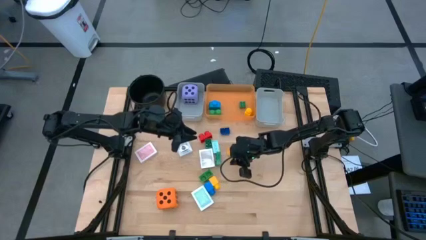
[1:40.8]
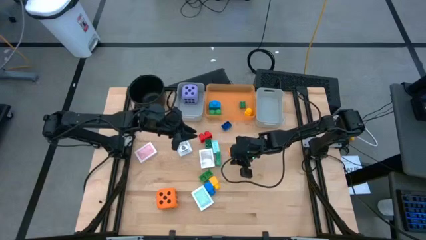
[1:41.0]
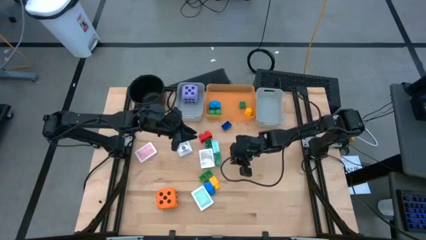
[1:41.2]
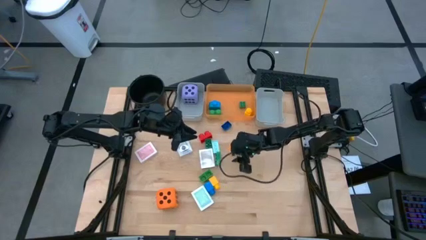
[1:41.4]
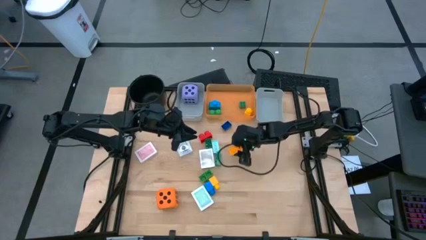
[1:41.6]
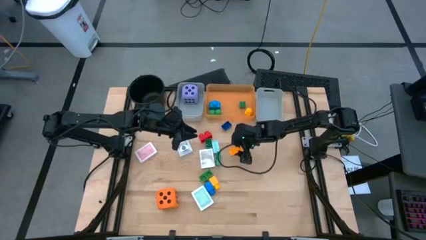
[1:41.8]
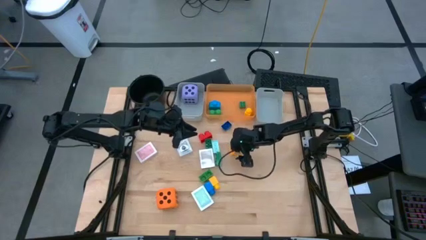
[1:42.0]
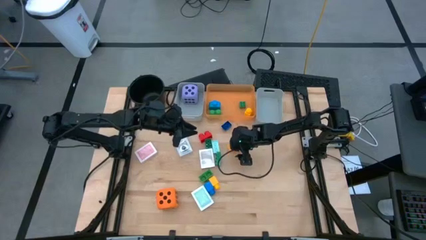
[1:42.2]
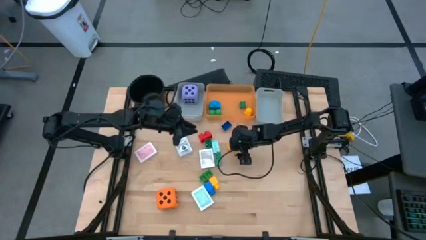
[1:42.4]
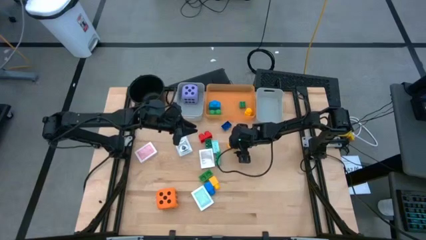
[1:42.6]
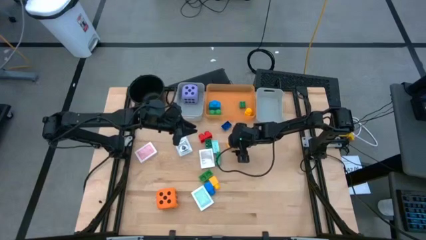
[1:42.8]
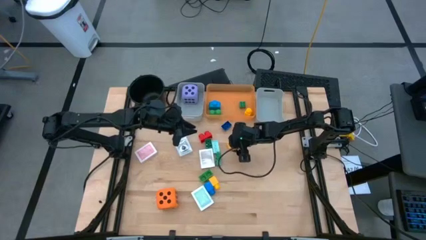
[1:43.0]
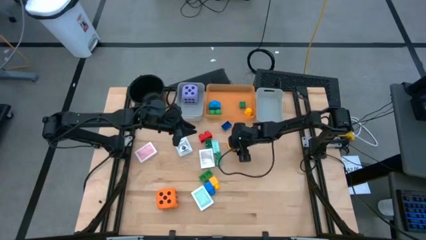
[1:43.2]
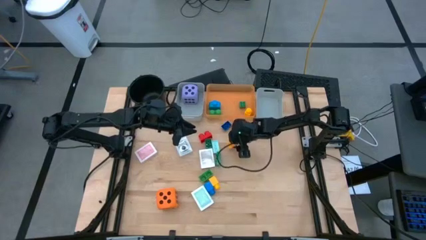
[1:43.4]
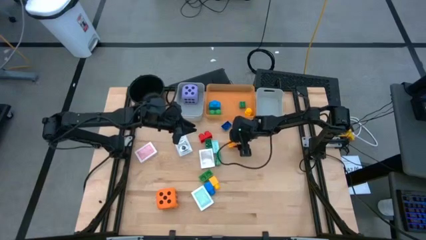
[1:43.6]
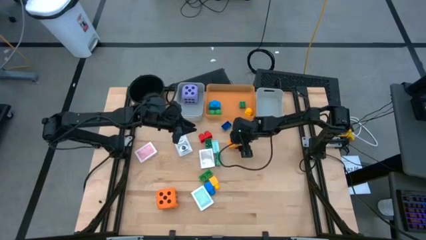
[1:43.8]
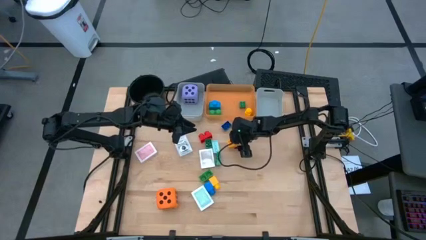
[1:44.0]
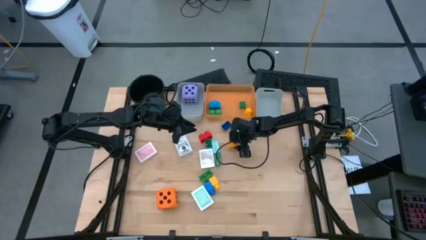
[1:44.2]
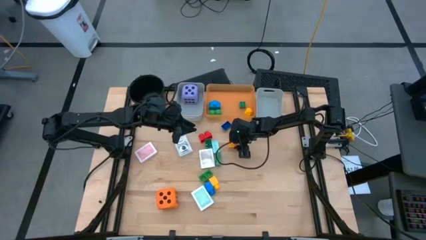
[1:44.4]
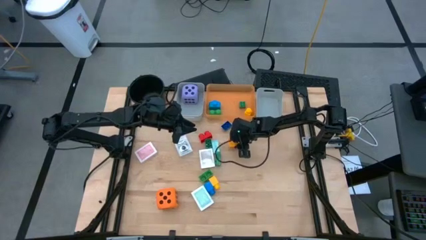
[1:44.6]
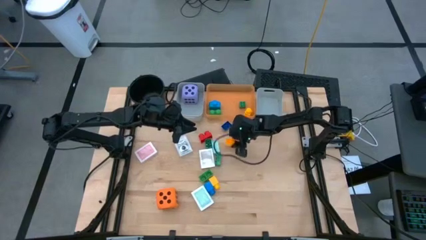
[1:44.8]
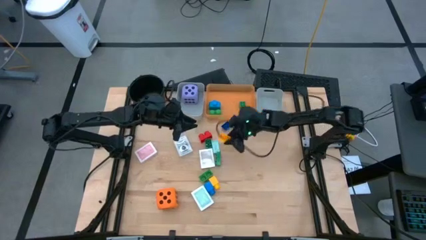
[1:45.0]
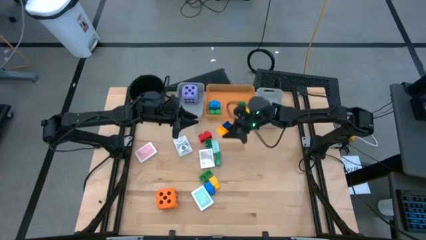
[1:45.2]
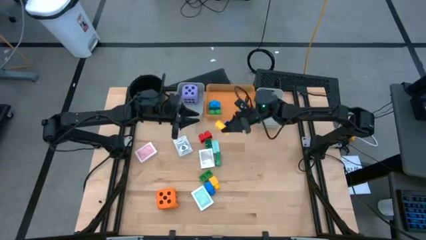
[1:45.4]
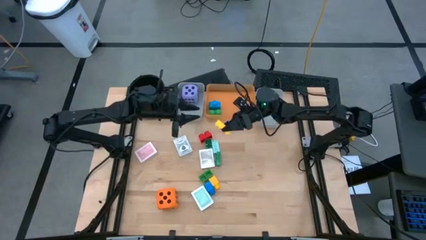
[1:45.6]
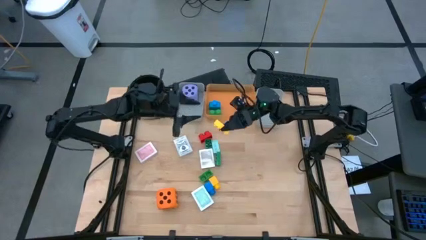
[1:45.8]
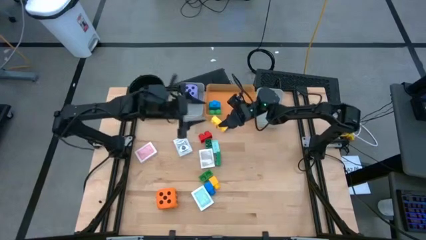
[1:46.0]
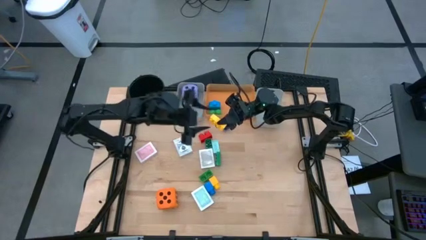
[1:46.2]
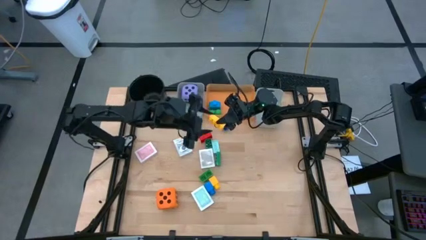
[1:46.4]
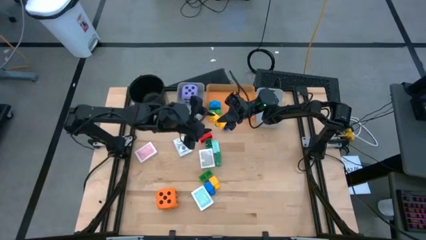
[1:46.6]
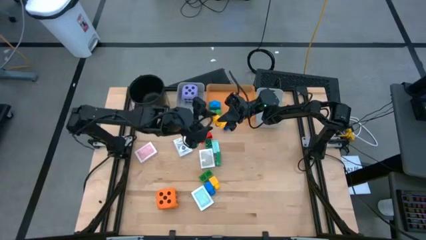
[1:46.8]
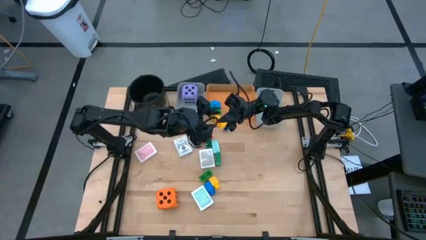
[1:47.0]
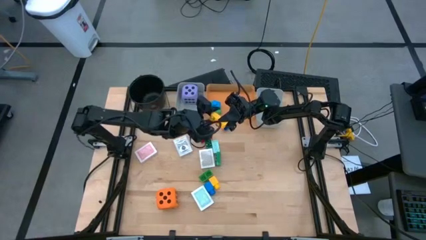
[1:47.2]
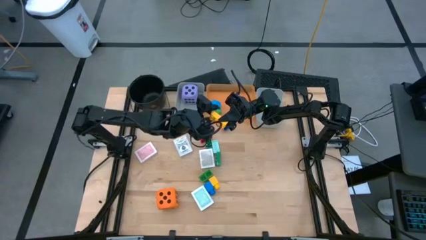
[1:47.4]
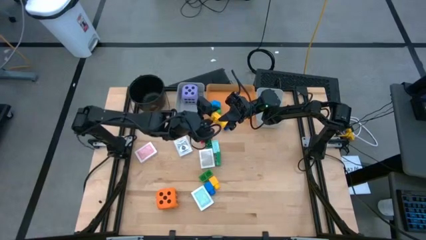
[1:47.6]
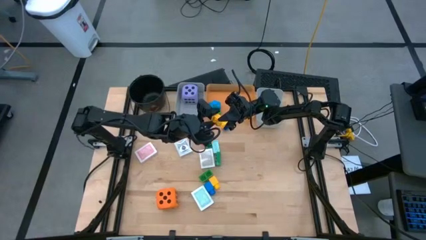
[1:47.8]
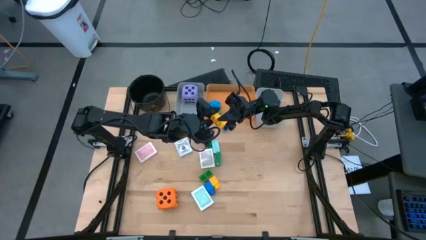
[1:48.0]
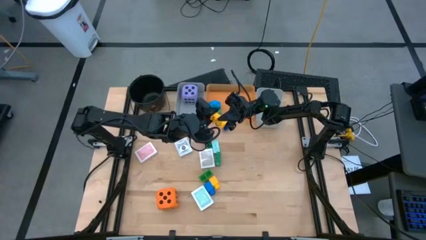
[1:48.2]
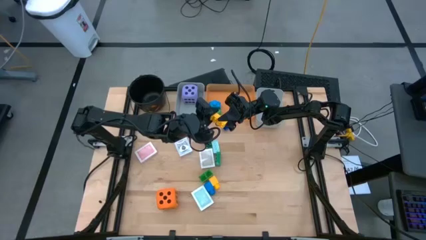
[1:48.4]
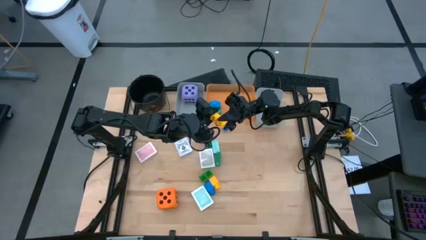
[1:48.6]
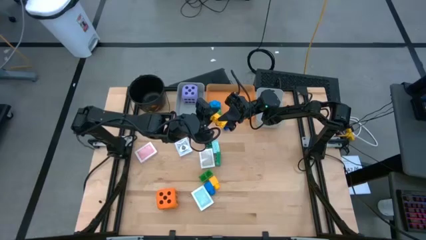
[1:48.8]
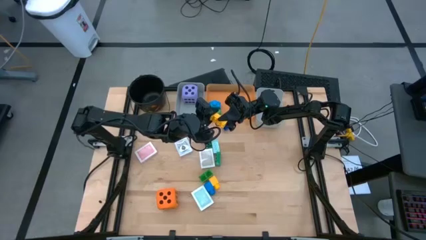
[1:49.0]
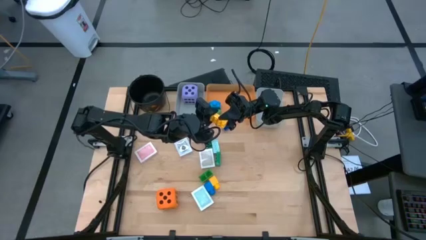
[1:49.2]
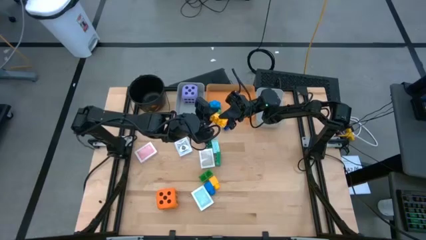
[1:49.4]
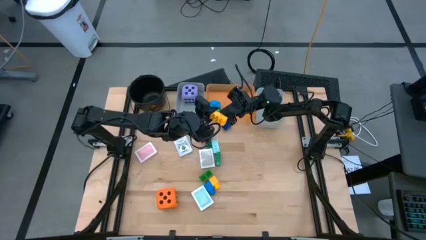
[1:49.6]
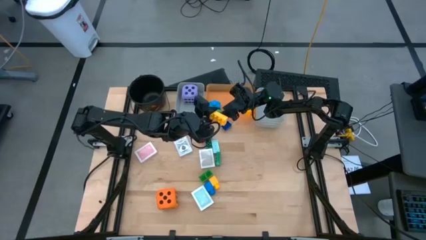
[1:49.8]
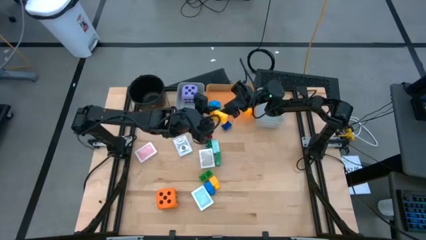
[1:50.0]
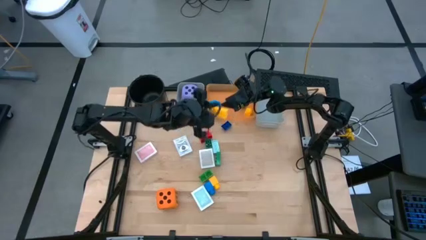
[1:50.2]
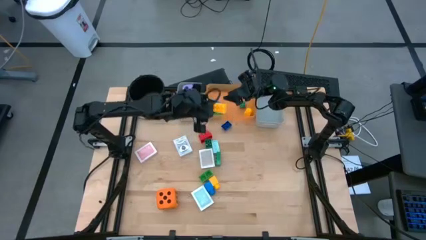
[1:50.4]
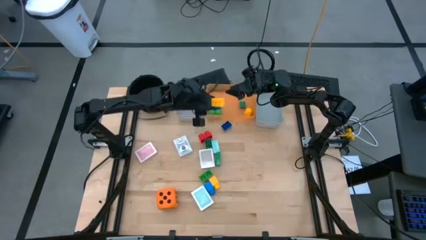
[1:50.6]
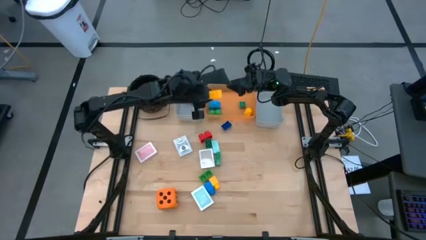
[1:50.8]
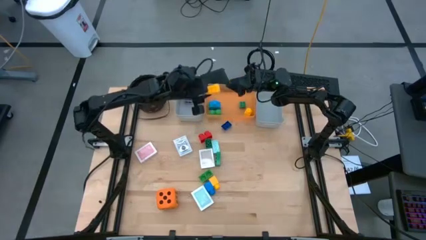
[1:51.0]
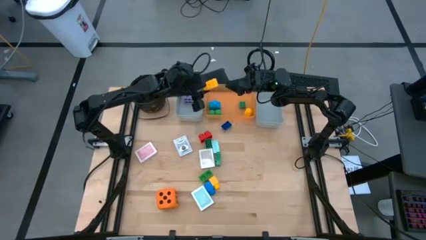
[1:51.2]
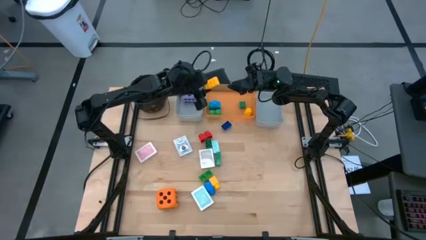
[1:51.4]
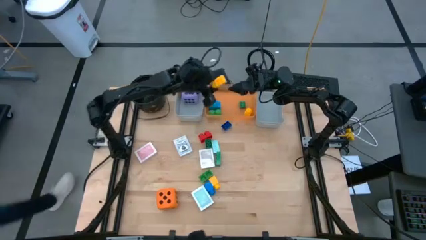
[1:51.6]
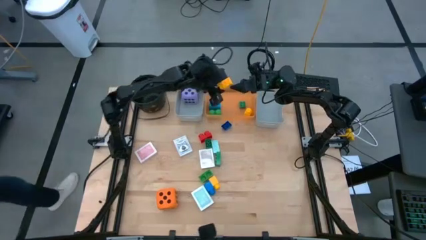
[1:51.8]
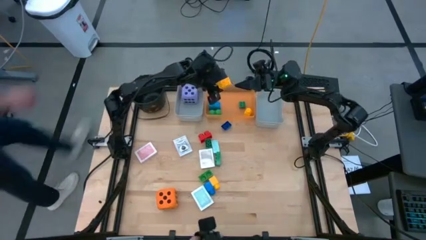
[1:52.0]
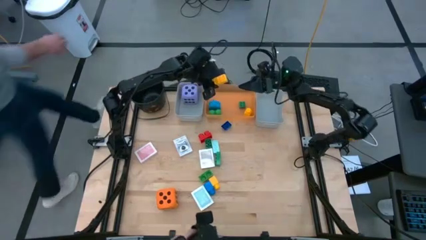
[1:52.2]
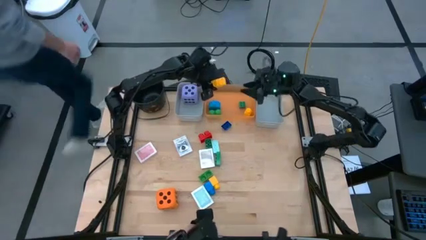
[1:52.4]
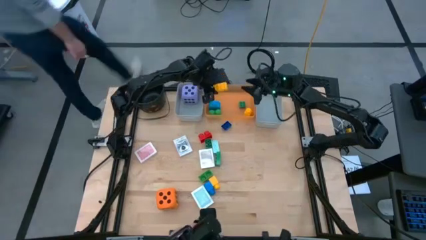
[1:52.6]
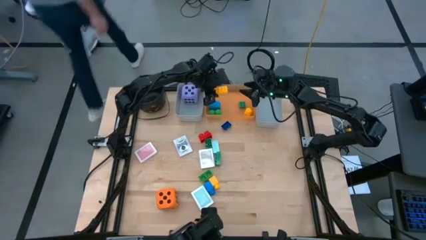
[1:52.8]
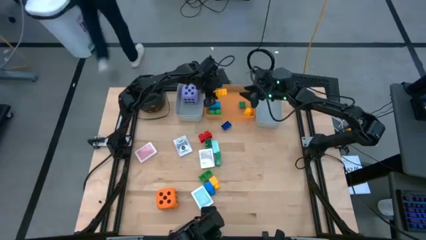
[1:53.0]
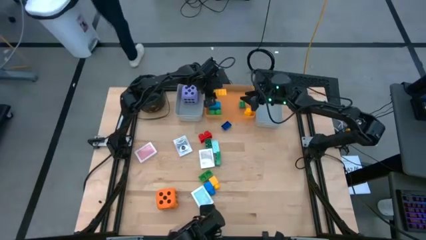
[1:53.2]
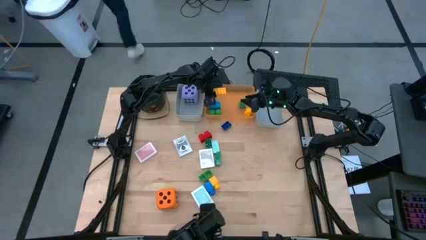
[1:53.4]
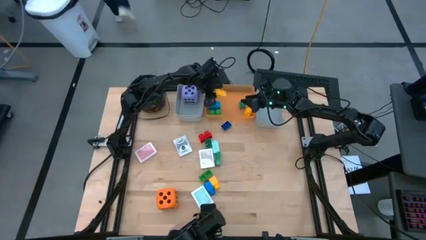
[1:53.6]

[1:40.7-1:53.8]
Task: Pick & Place Toys
Put the top yellow game piece into the orange bin

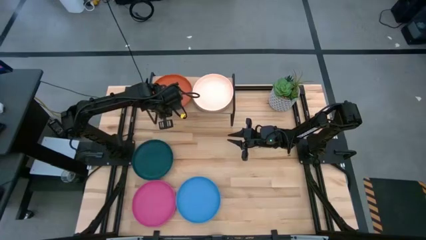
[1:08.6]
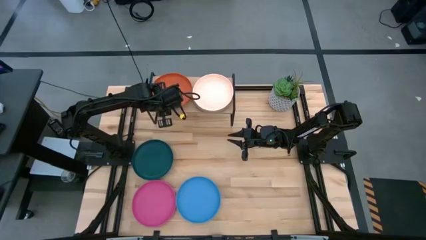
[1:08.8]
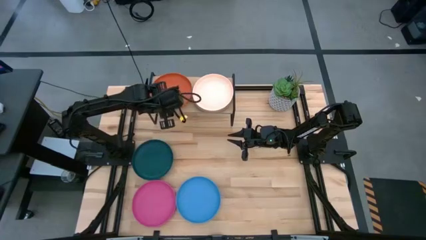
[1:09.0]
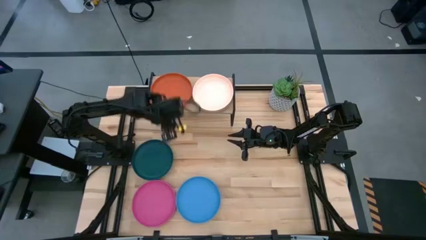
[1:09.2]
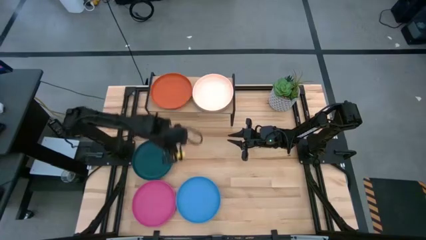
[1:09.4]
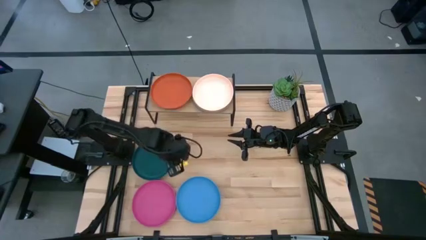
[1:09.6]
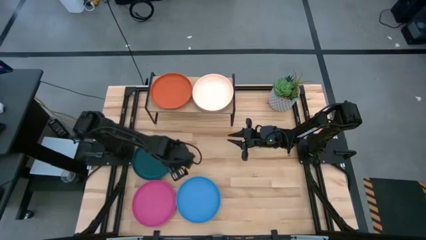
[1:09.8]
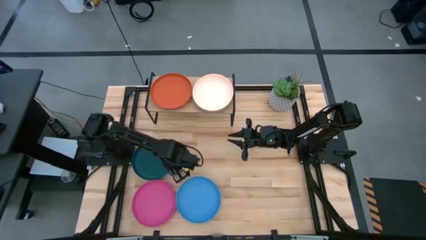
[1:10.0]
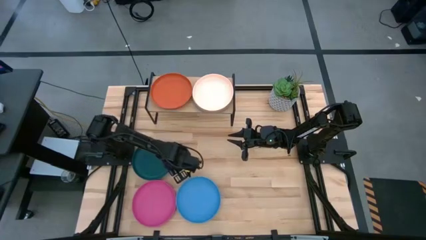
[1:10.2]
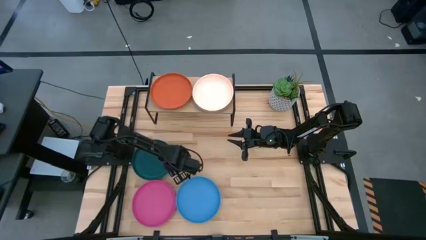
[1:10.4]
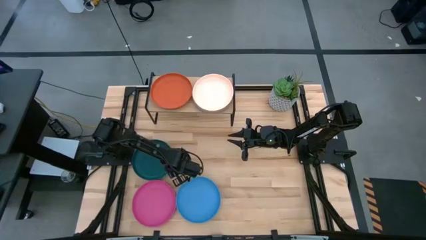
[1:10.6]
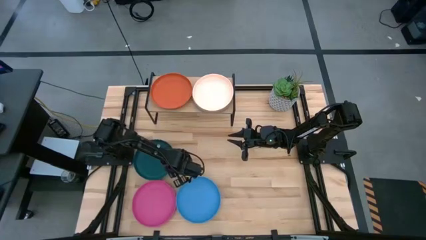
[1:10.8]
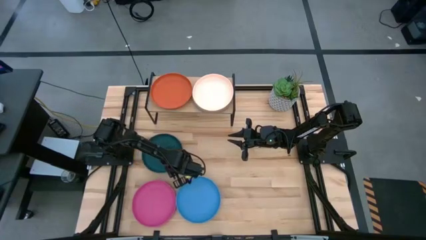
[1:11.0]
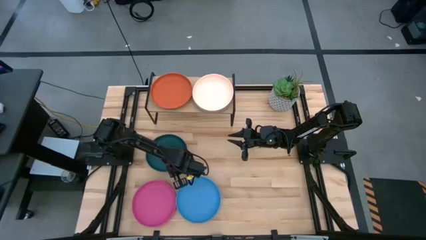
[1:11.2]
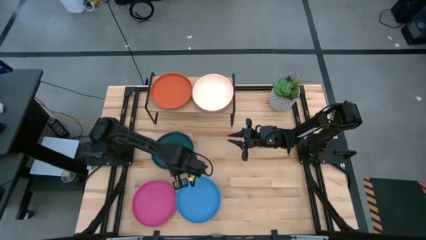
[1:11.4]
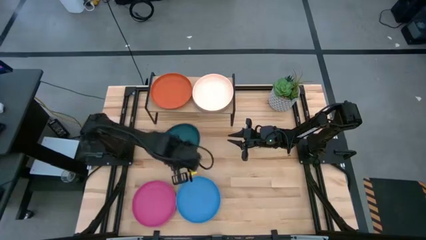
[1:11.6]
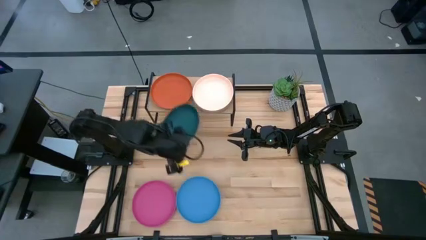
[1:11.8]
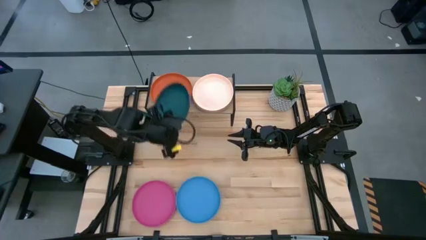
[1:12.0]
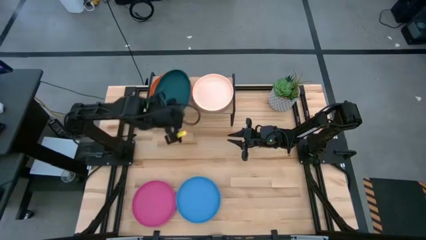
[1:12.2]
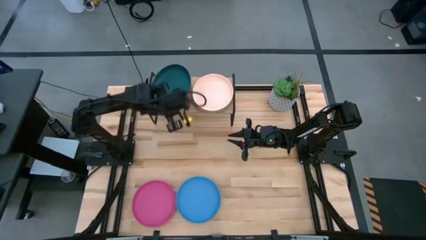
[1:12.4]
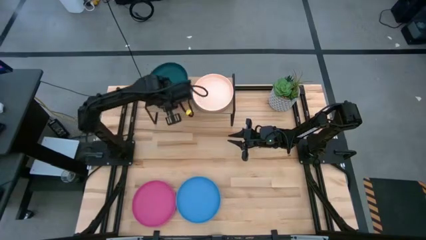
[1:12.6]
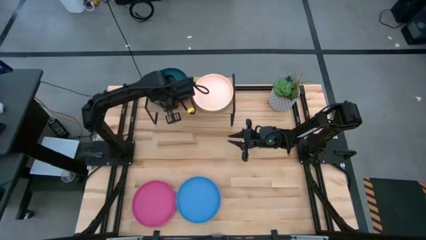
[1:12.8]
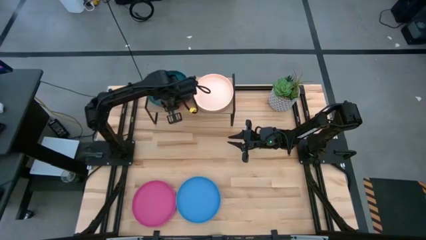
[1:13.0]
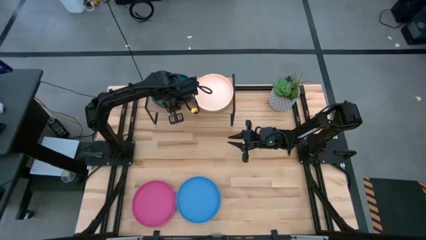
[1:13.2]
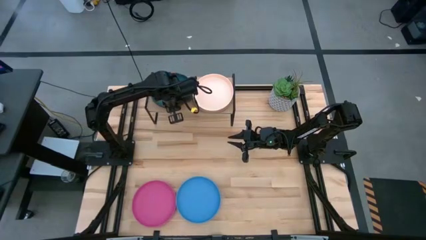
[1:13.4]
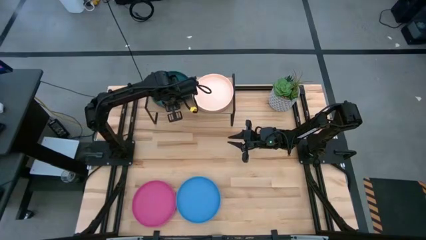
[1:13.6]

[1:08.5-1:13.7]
Task: Place and stack plates onto a shelf
Stack the green plate on top of the orange plate on the shelf
